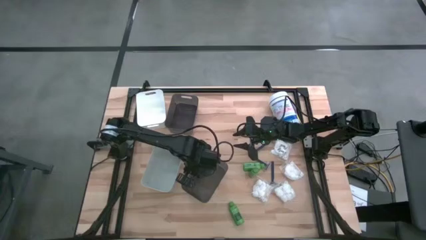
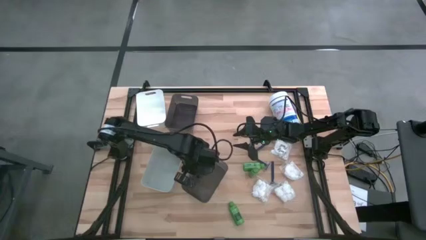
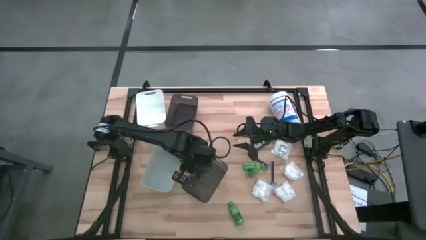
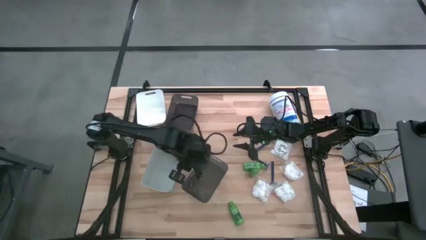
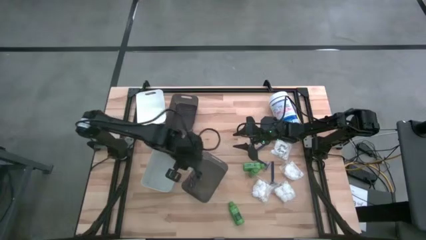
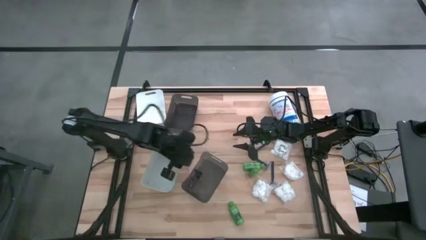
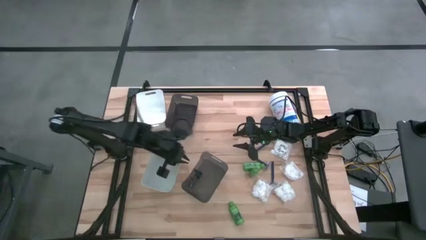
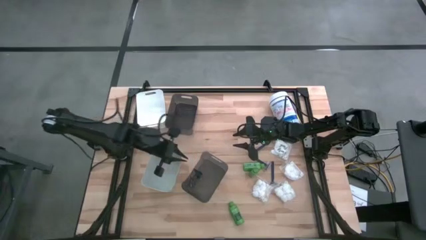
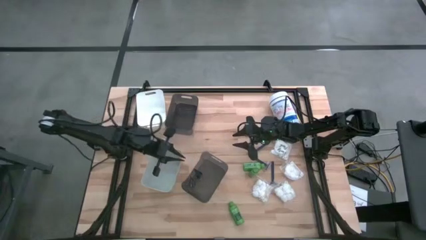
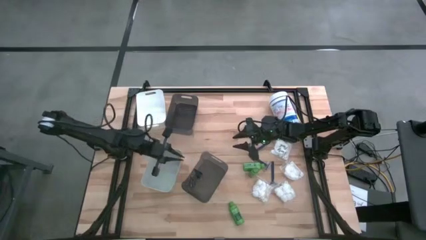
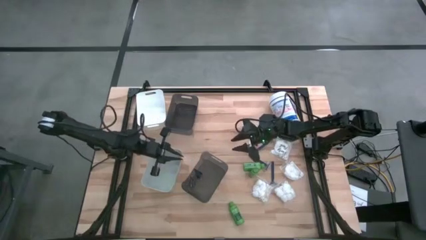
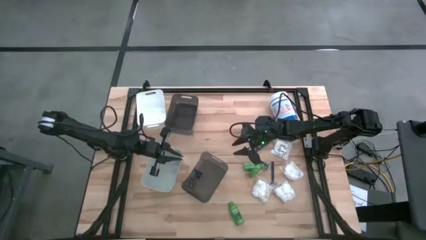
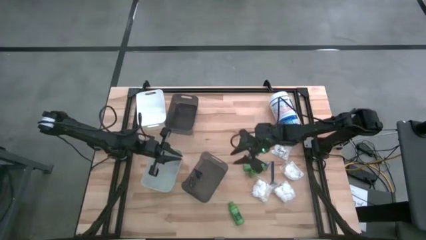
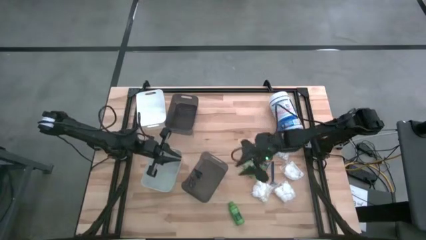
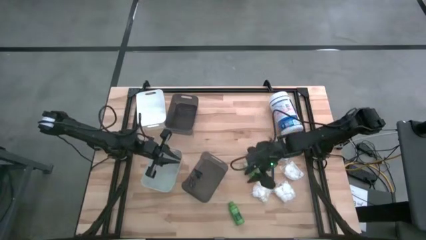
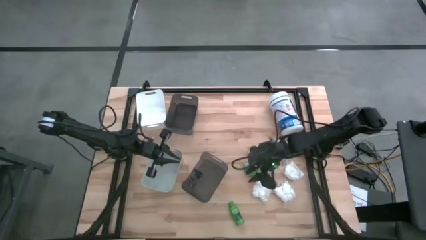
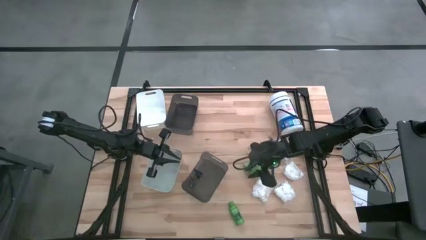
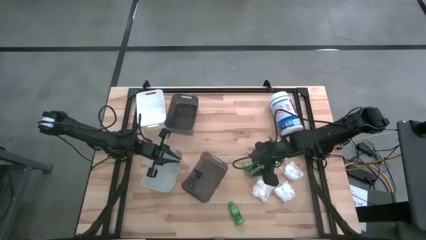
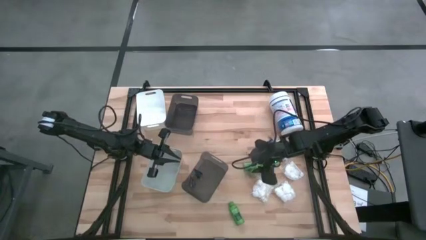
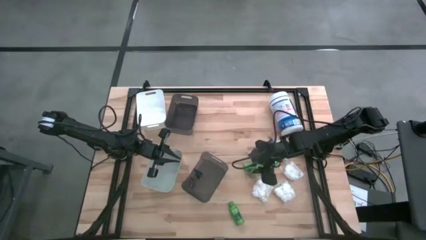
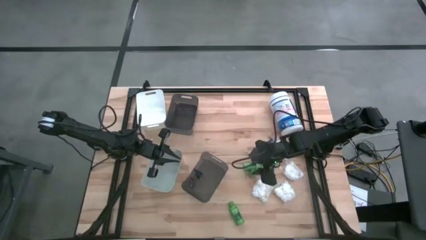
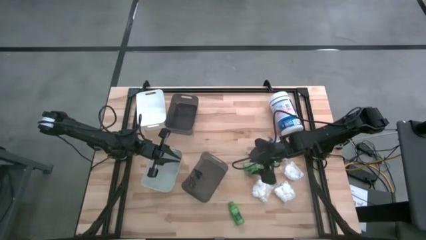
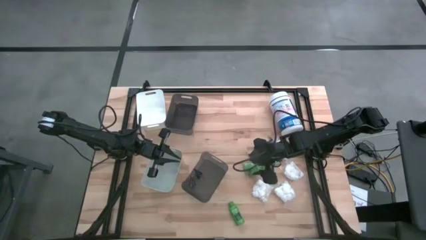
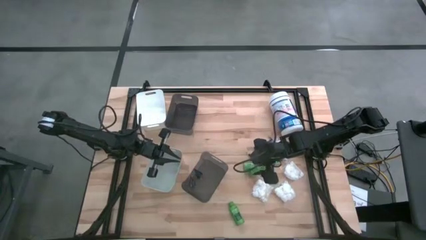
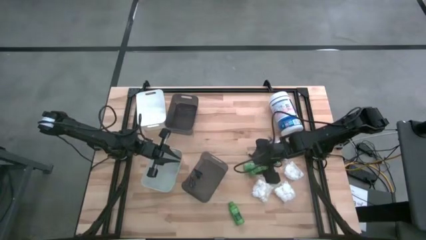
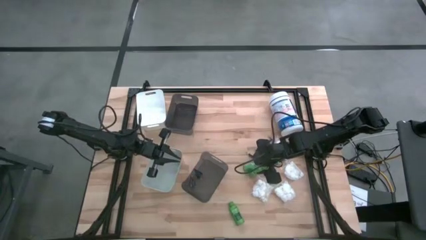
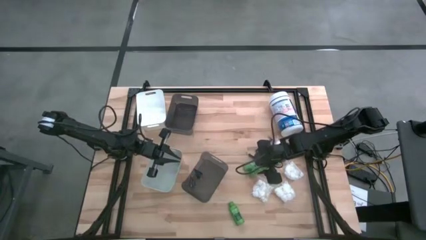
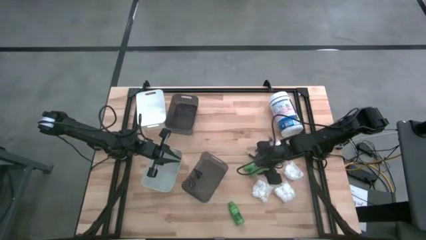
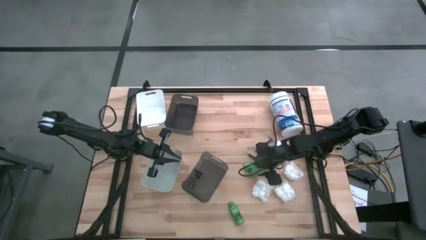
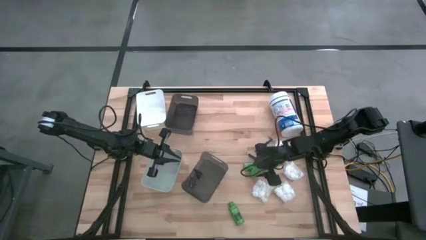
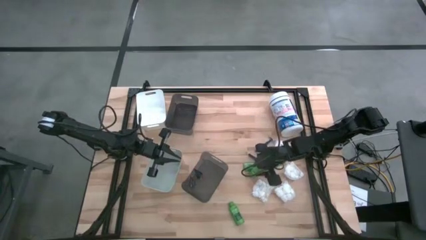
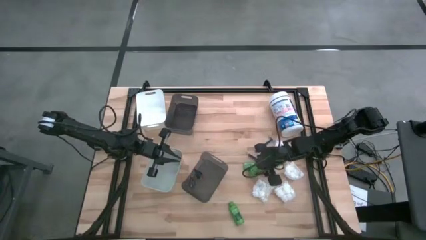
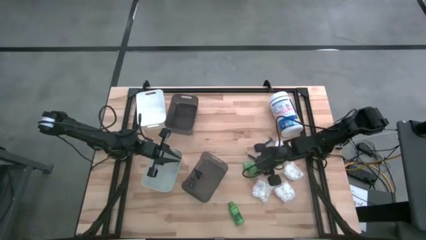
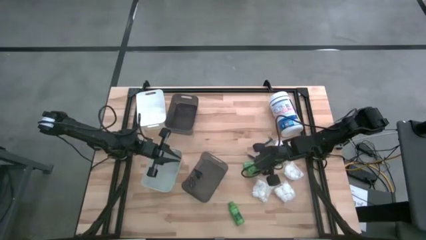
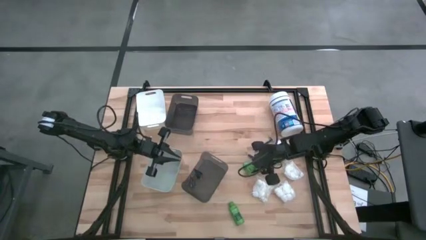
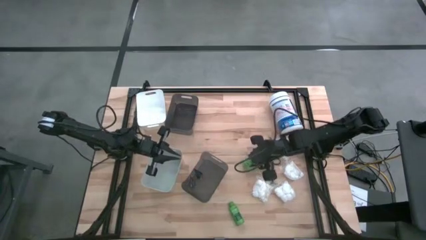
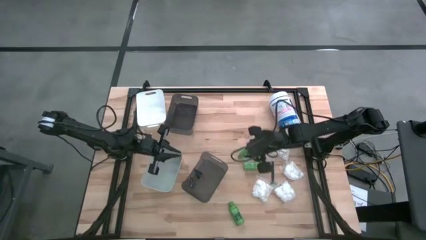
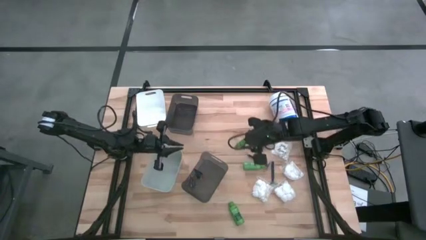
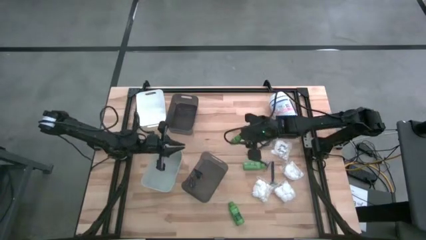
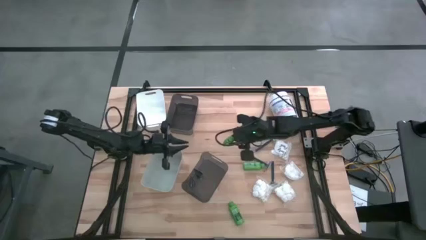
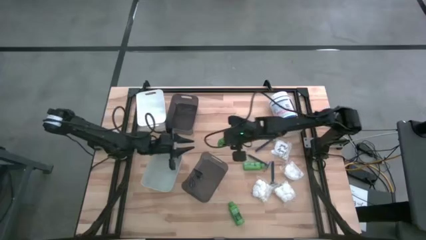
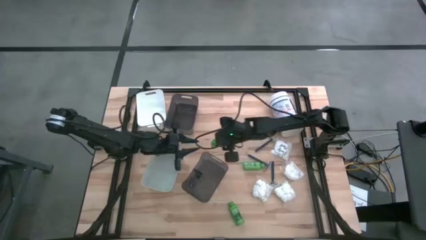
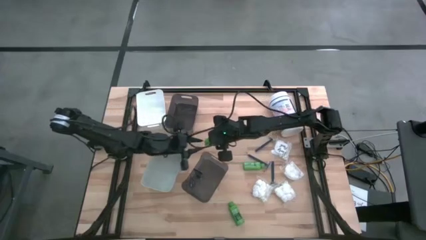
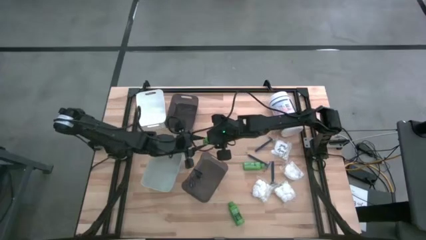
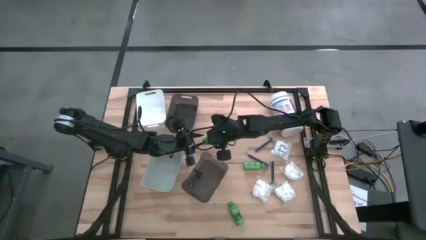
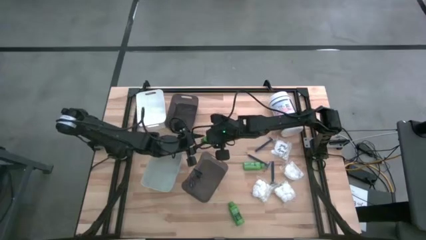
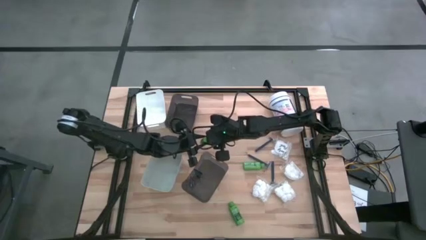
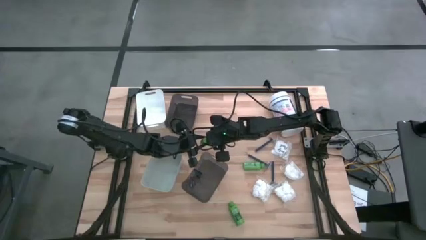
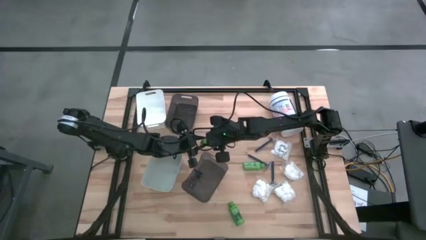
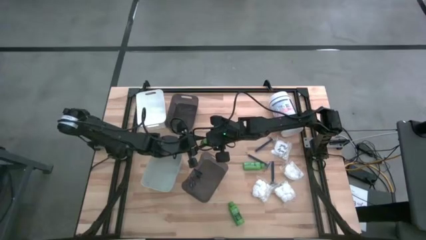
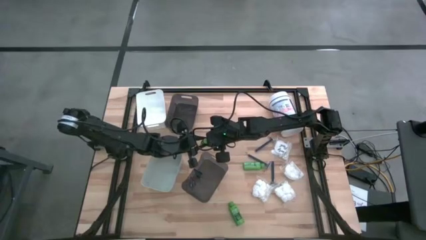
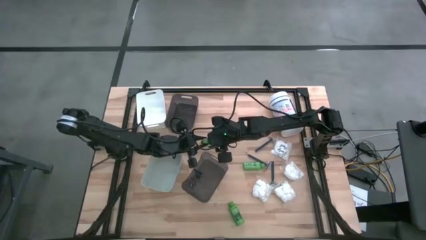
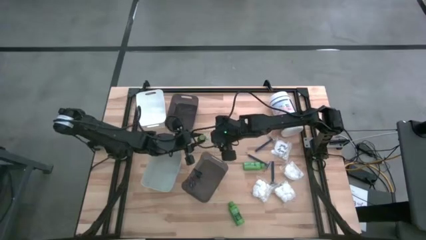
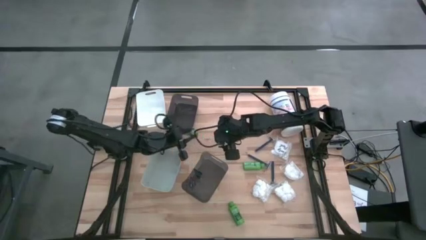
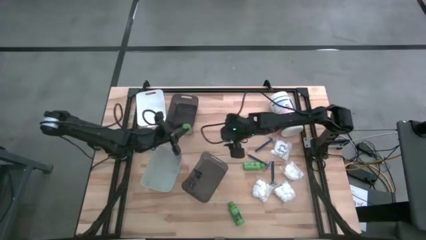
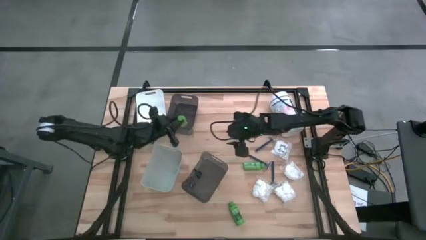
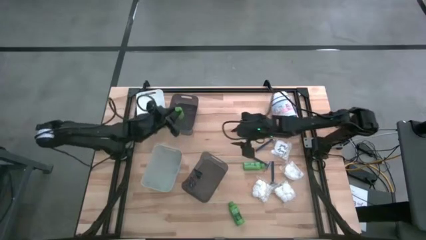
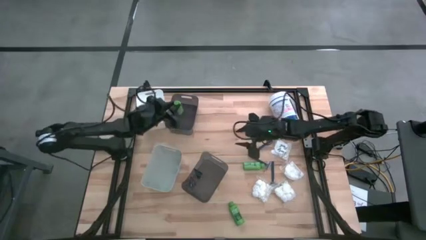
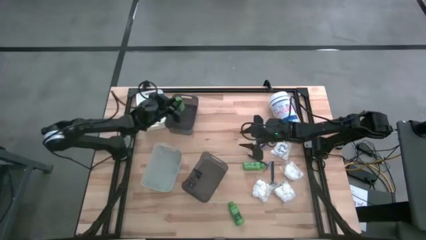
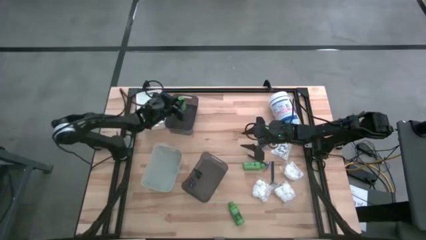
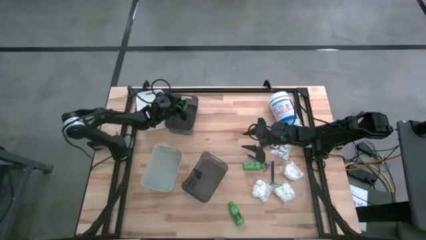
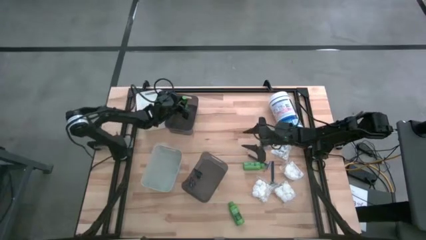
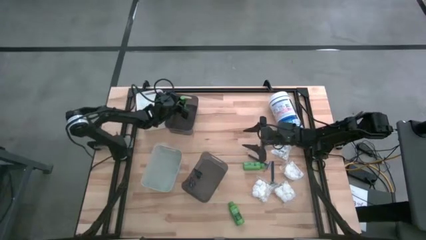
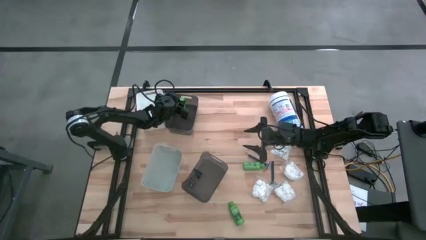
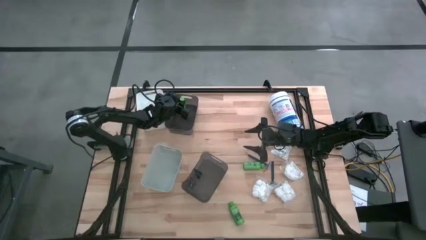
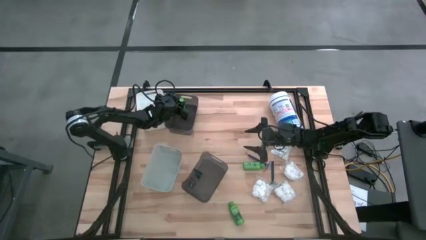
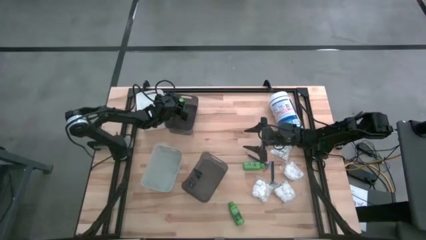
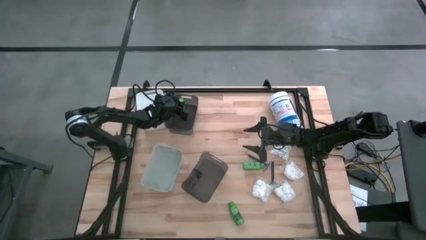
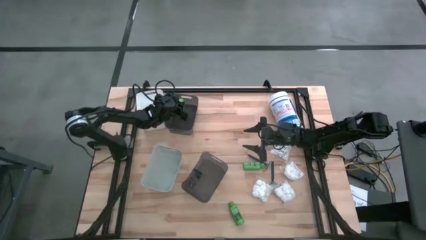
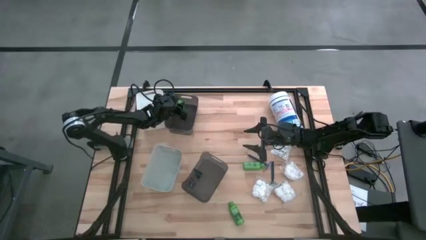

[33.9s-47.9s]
Task: Pick & Place Travel size toiletries
Put the middle green shampoo into the top black transparent bin

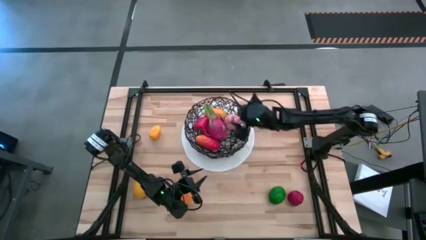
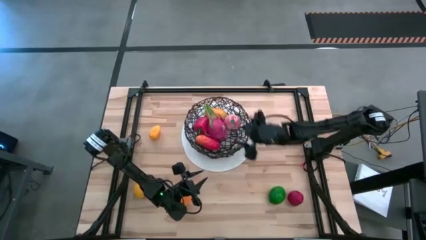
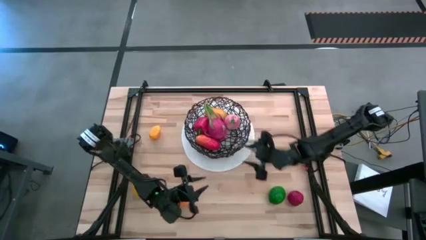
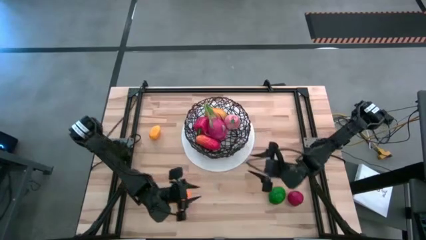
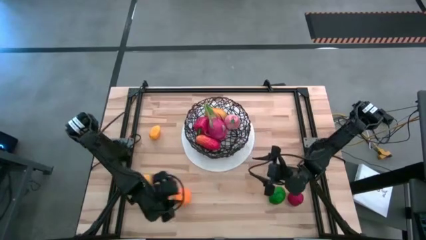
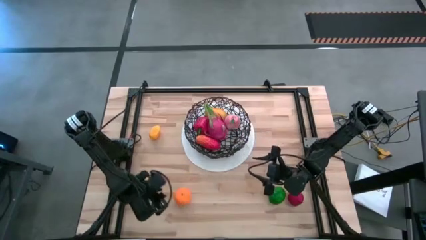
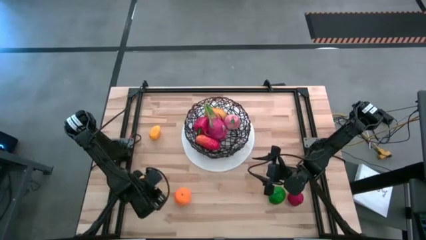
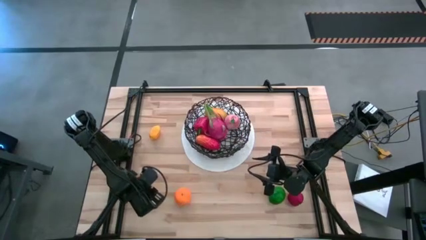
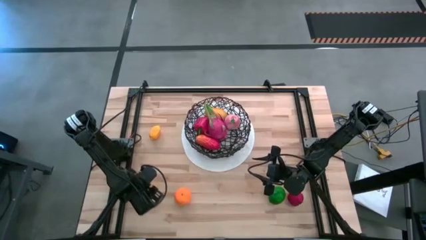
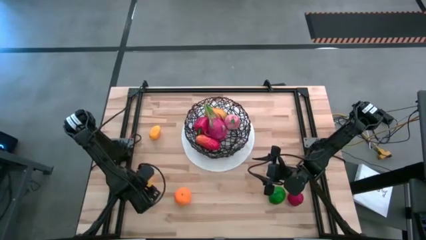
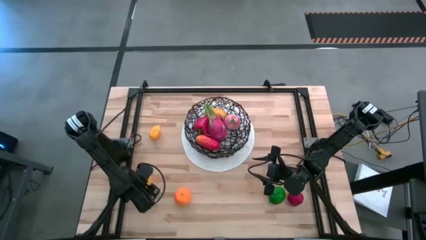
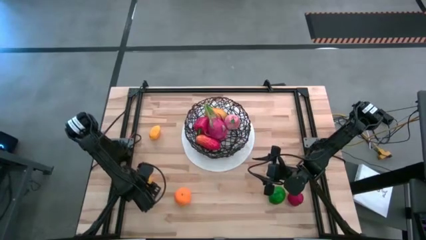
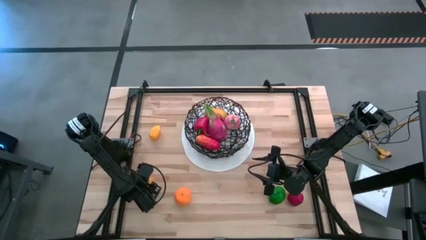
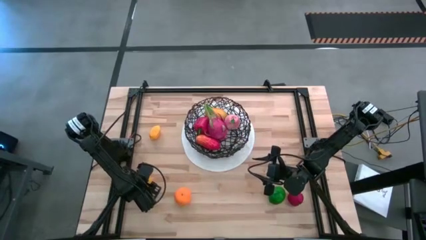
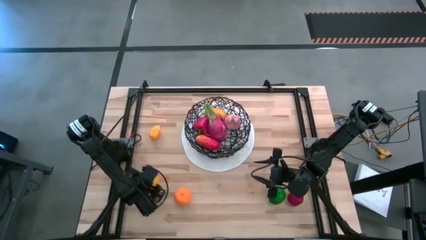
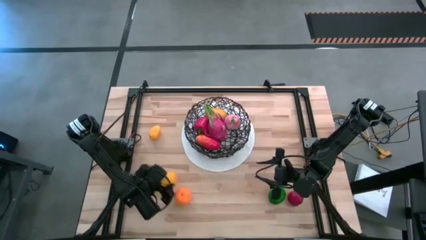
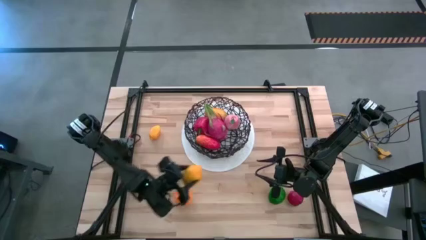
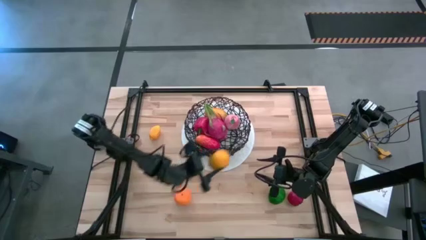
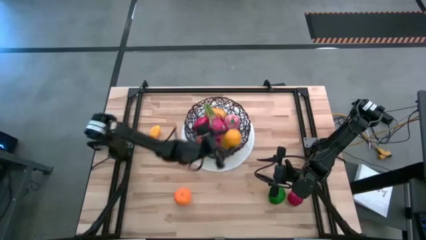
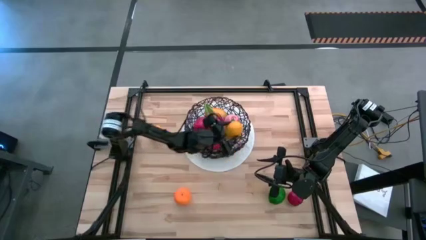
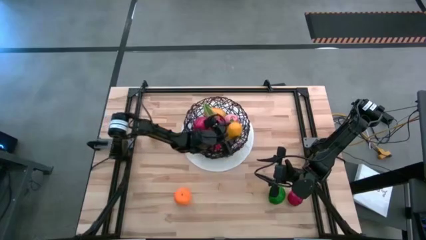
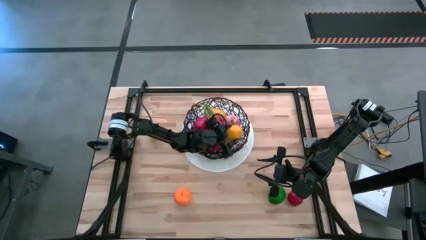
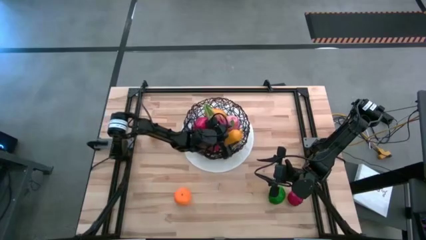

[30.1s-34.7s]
Task: Build produce basket
Put the bottom lemon into the wire basket
